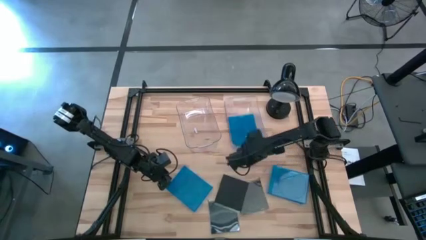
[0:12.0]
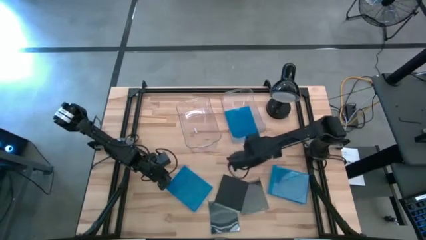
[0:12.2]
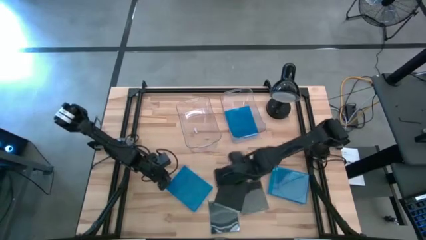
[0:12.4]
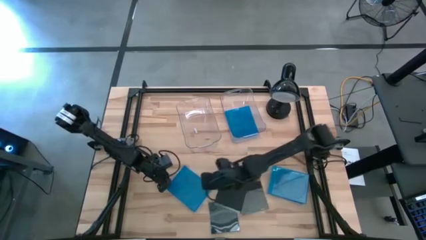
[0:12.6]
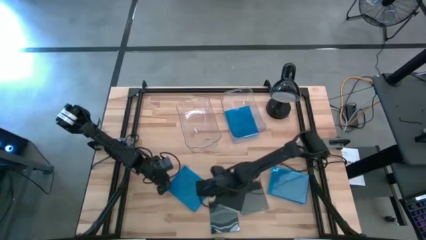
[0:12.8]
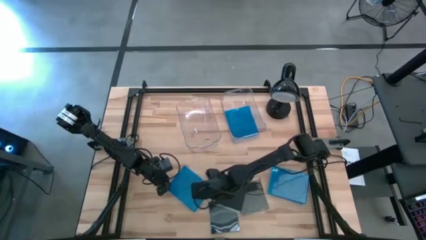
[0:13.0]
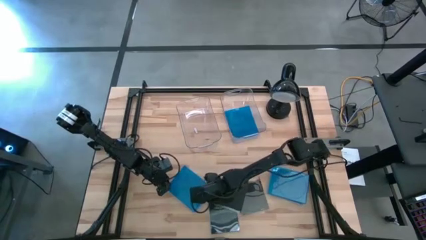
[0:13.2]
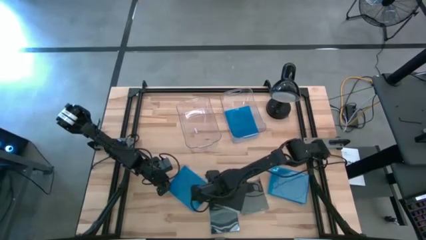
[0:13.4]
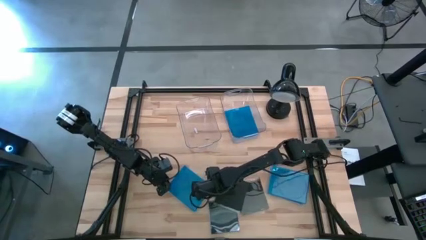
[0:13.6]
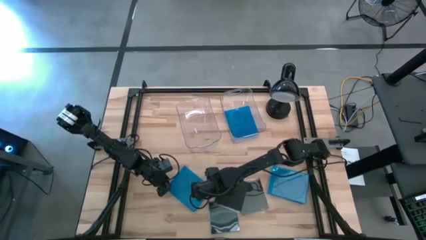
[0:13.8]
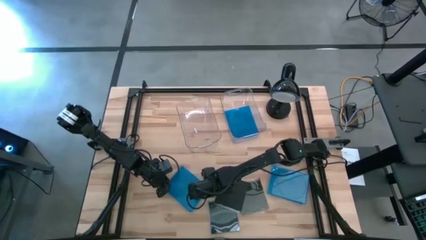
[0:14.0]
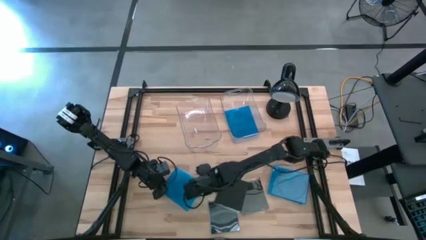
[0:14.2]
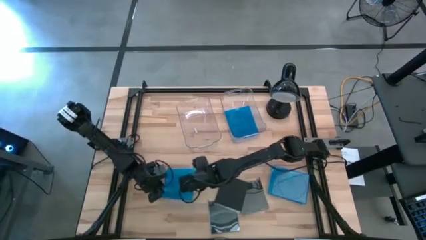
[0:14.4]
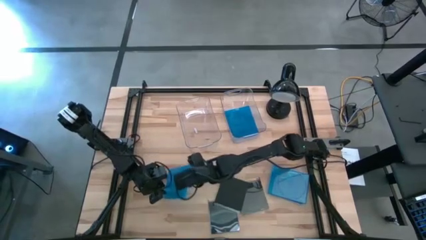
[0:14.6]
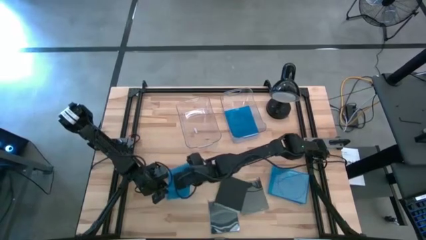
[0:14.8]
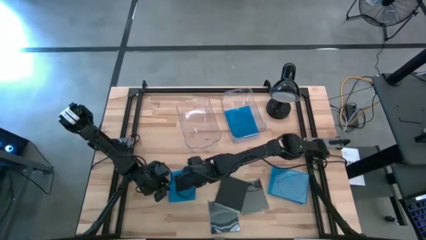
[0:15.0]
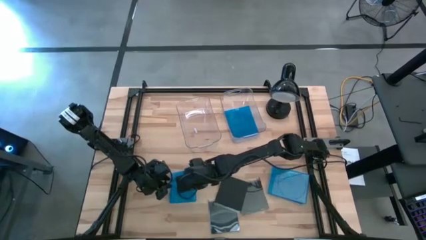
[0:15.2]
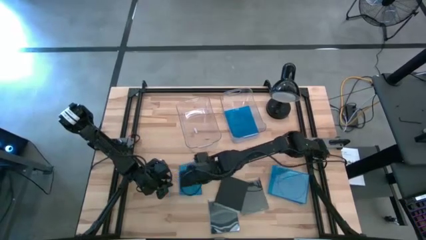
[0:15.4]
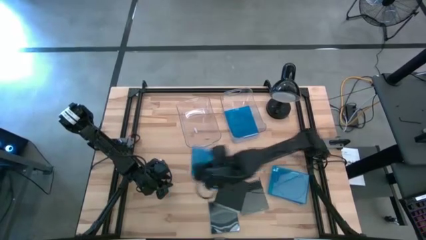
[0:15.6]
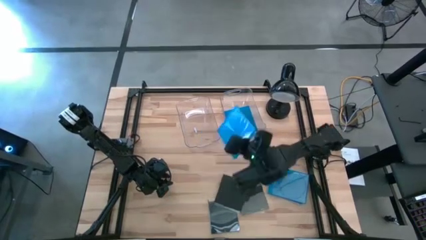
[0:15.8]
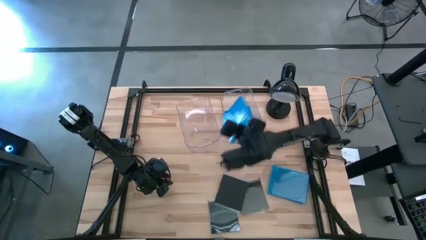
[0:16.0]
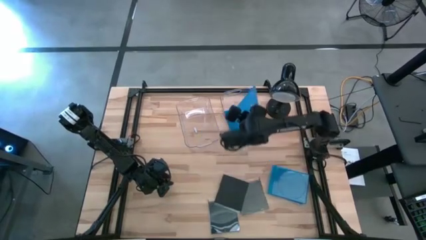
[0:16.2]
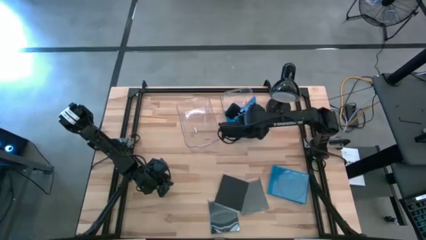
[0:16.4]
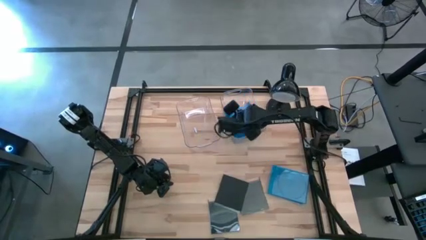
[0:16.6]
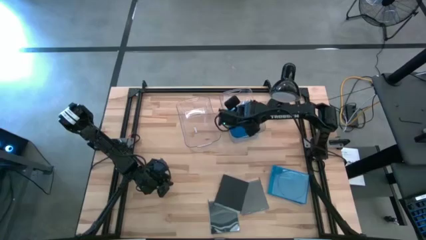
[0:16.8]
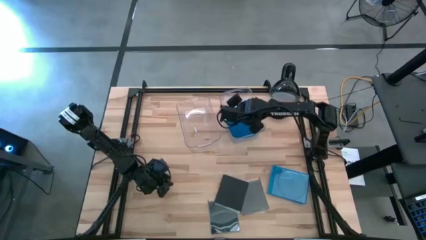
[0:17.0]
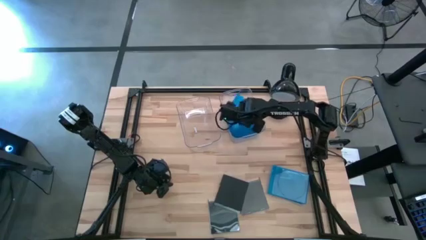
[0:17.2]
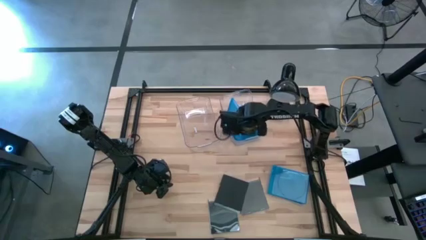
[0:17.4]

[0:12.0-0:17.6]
Task: Pick & place jewel cases by type
Put the blue CD case into the right transparent bin

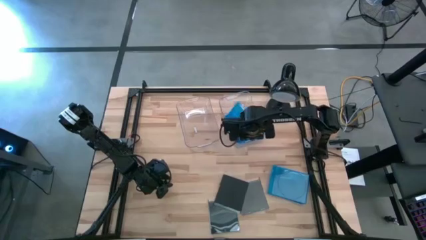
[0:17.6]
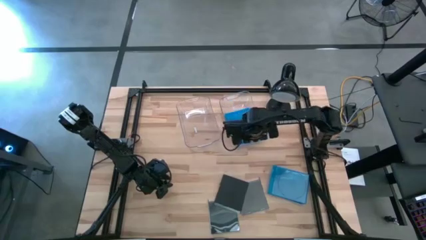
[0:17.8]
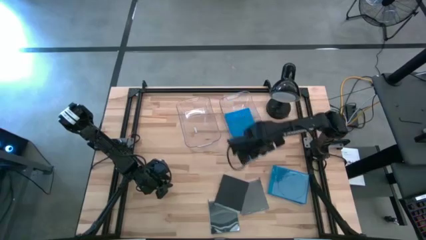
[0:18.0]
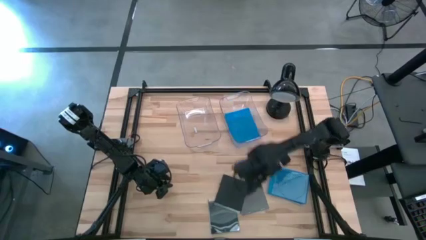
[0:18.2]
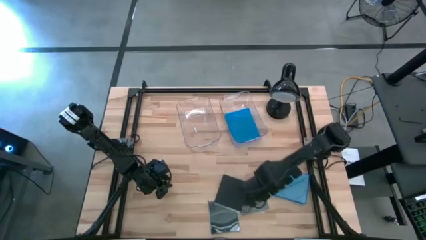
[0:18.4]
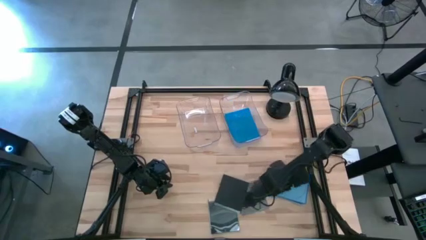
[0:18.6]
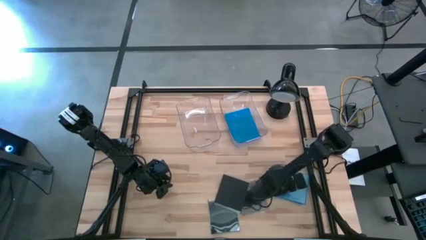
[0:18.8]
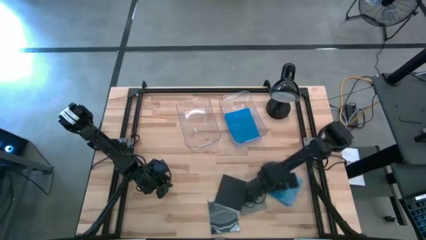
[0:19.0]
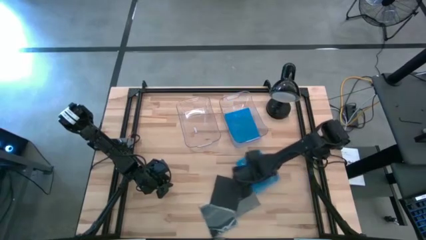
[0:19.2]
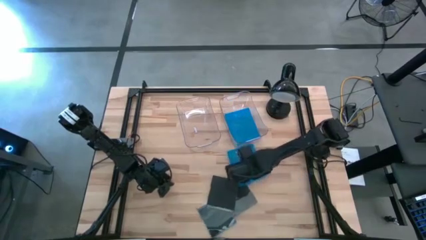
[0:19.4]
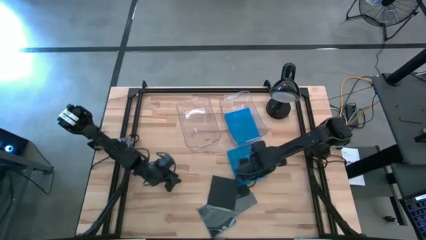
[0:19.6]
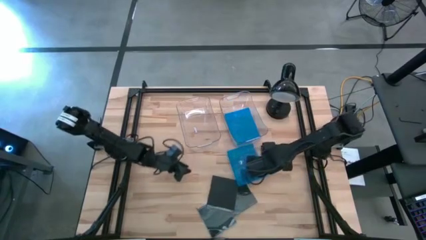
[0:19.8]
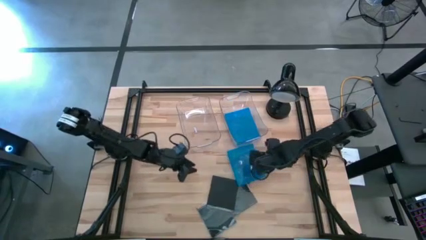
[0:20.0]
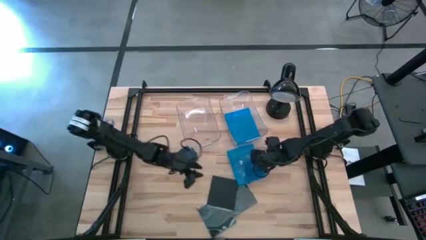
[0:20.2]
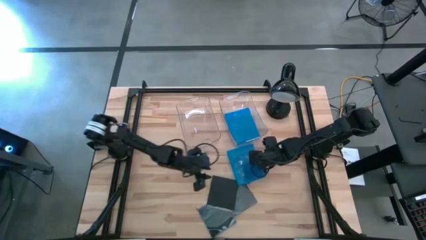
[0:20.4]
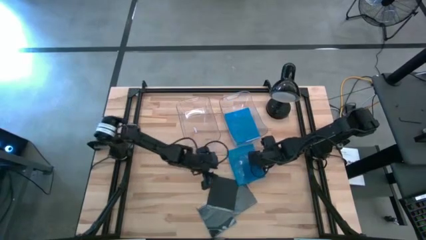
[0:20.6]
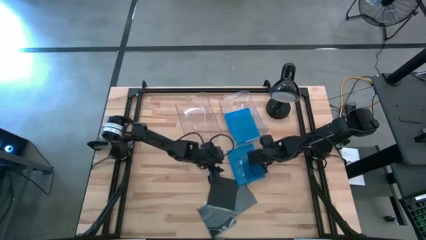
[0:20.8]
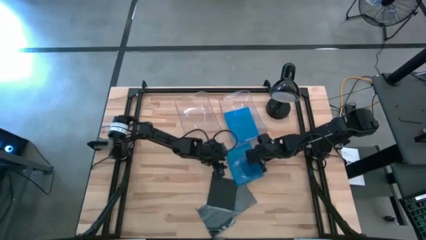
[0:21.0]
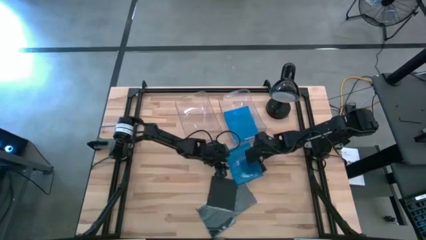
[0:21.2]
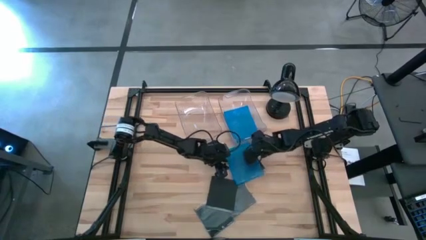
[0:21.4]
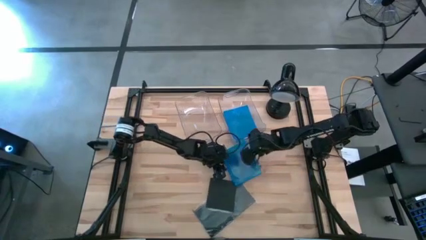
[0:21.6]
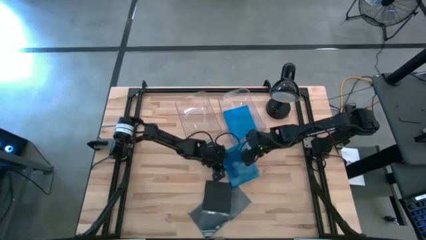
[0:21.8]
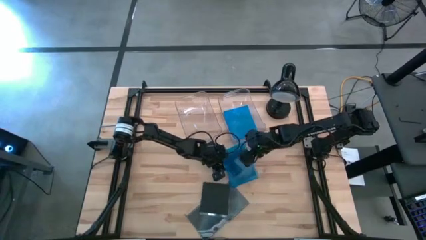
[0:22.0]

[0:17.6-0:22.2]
Put the blue CD case into the right transparent bin

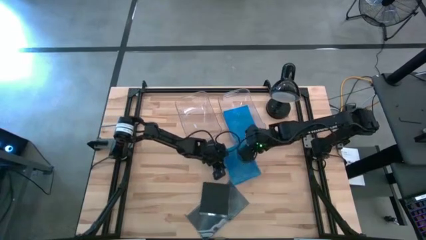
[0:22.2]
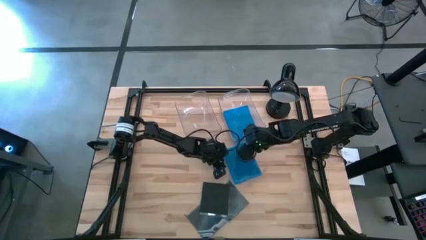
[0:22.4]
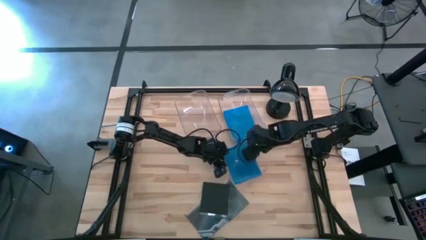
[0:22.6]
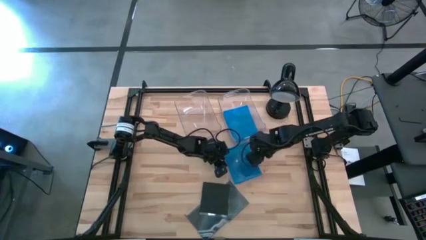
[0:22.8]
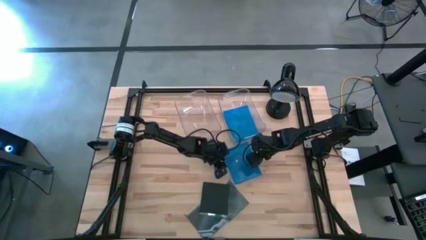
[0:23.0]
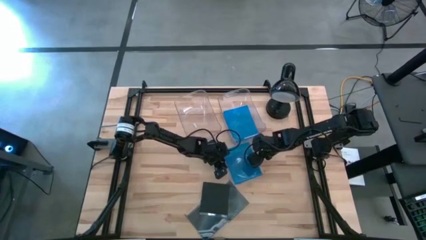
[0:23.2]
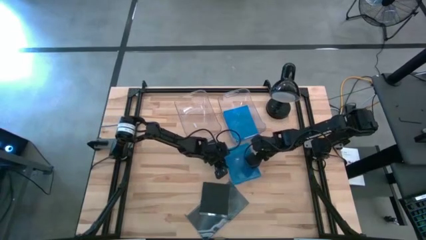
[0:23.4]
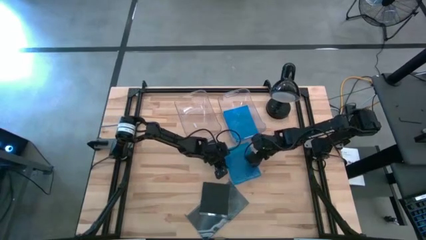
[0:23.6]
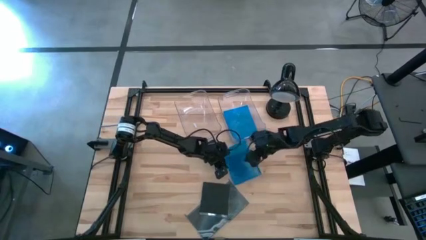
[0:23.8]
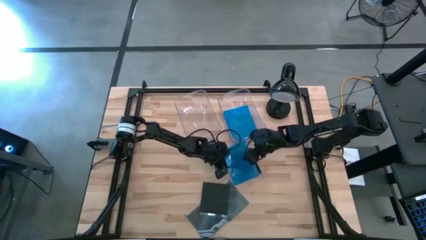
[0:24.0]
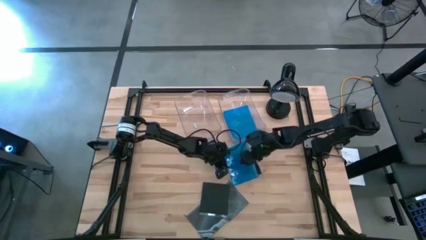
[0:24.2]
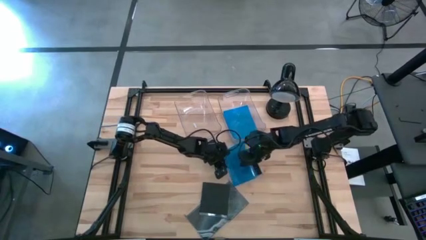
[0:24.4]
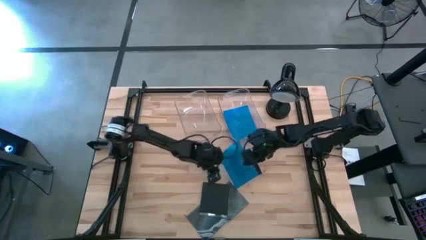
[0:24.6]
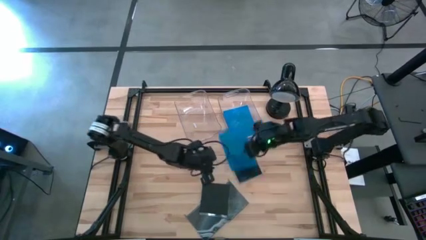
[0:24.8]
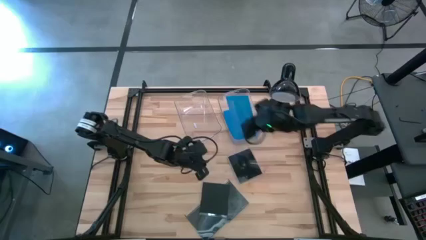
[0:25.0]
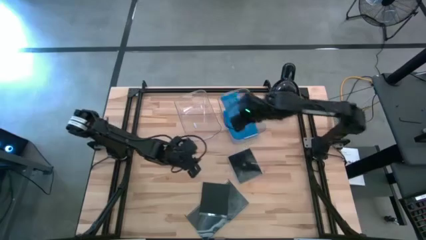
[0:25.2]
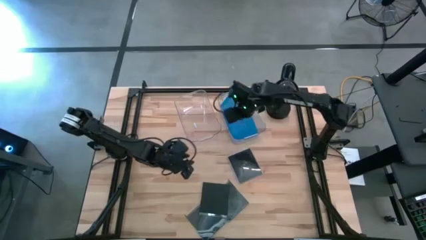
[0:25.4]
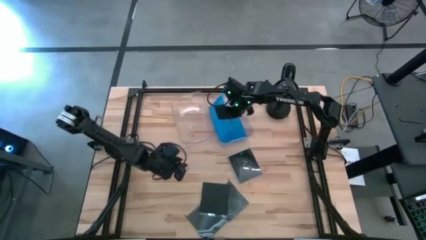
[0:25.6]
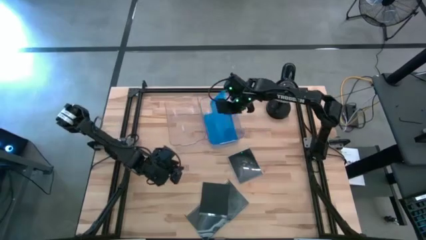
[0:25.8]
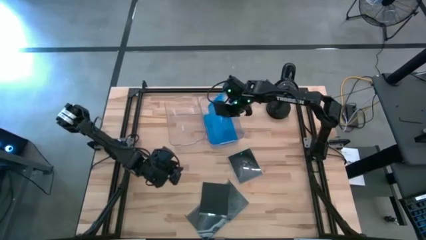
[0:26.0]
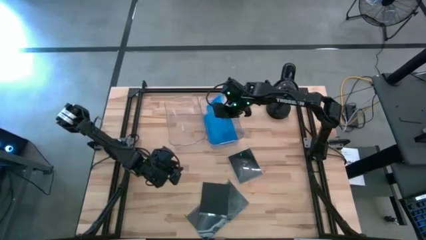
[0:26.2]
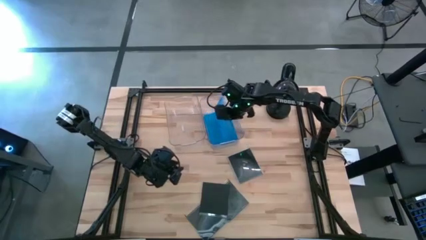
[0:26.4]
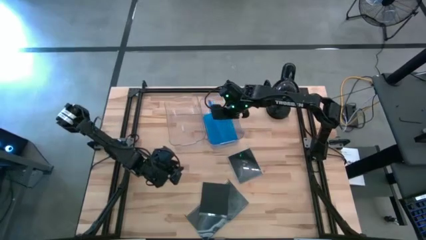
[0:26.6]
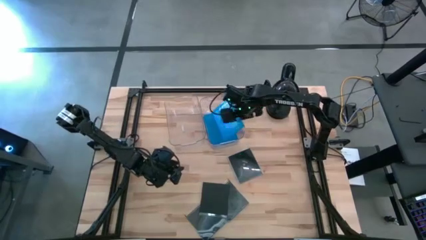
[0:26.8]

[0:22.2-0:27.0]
Put the blue CD case into the right transparent bin

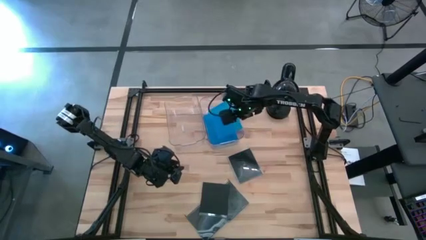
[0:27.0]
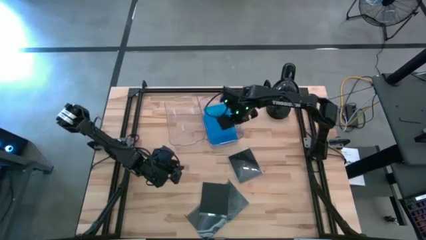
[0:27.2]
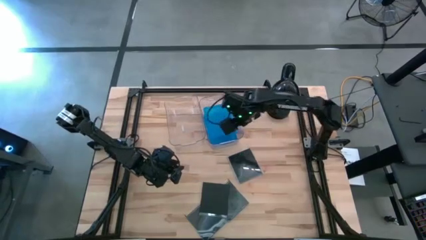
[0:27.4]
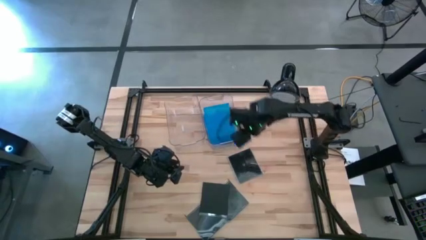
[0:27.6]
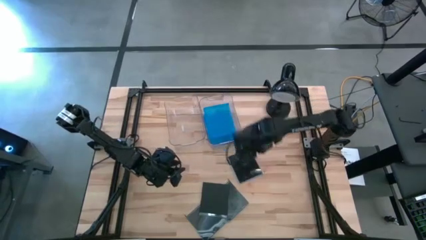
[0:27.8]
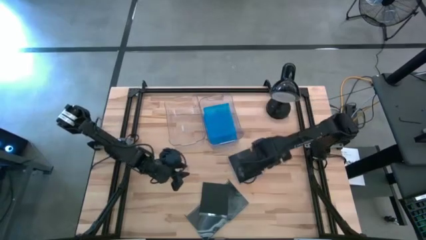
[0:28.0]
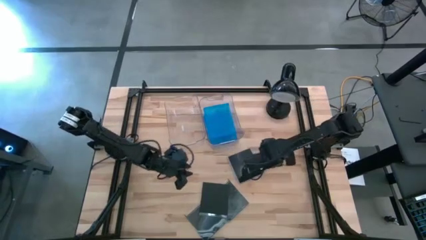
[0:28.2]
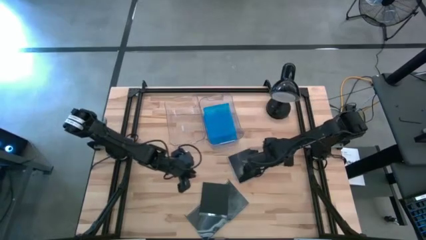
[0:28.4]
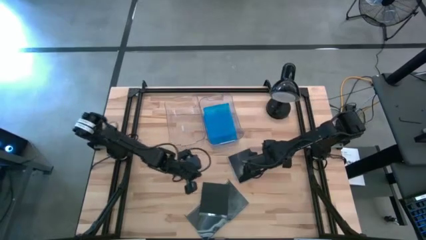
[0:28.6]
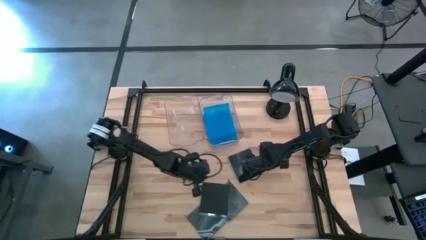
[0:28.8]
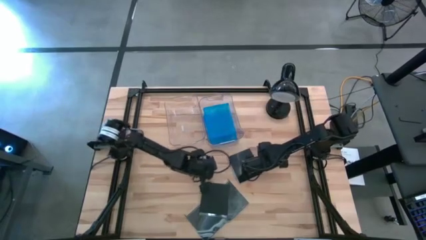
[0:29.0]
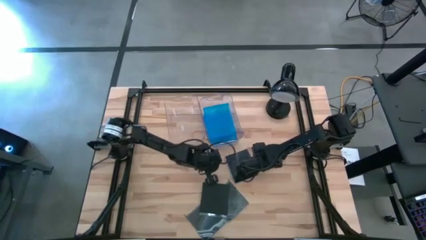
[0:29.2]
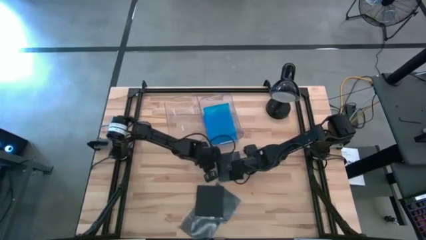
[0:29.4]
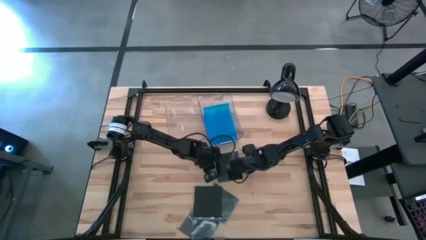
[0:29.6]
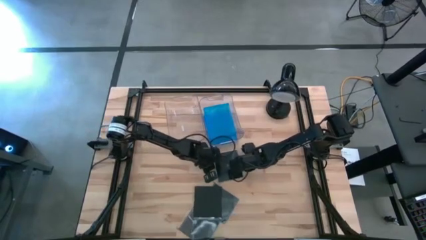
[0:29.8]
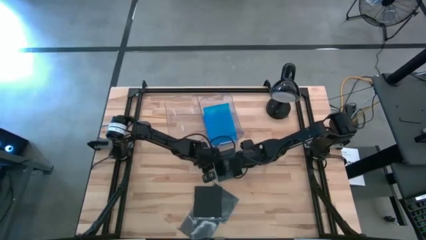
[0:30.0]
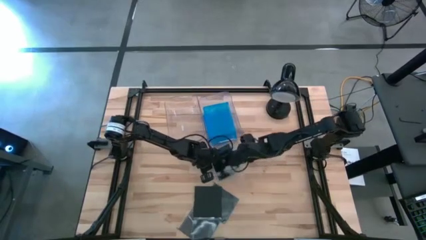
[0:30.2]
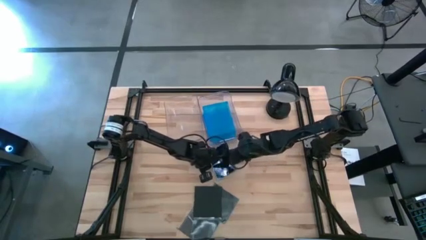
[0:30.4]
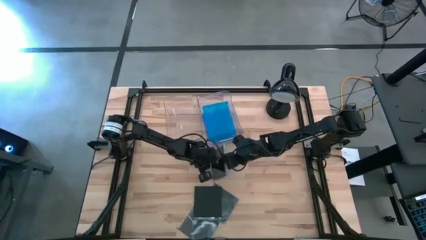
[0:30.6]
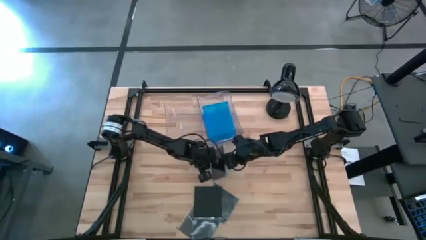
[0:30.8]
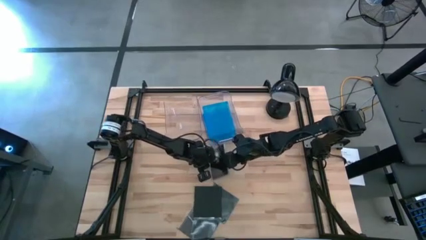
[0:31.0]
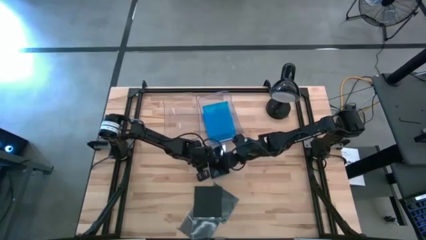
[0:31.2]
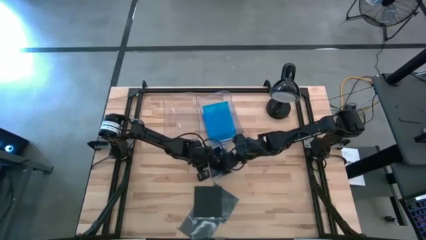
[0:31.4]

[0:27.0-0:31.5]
Put the black CD case into the left transparent bin
